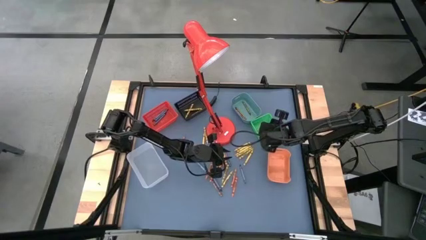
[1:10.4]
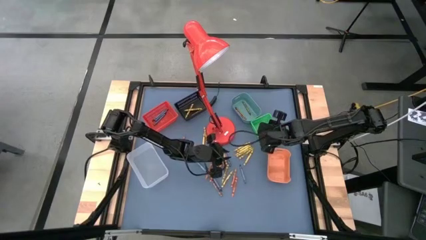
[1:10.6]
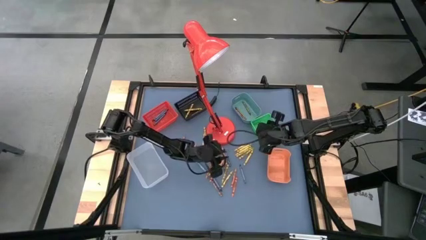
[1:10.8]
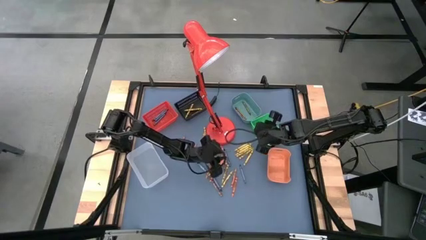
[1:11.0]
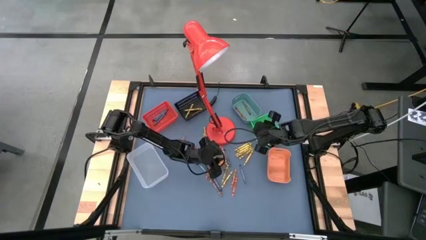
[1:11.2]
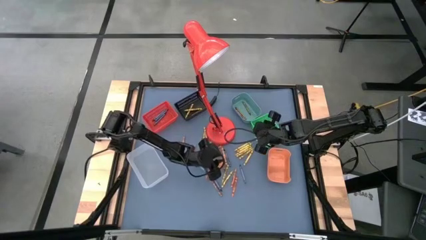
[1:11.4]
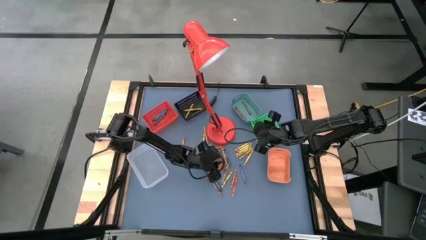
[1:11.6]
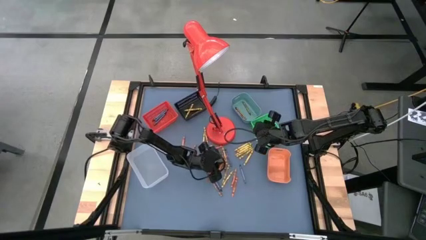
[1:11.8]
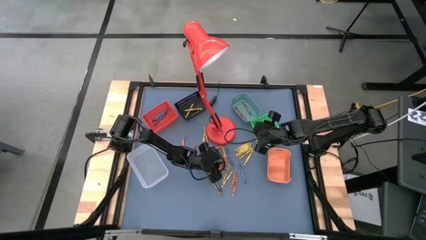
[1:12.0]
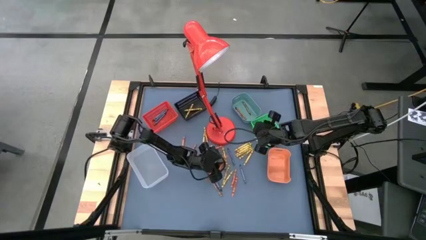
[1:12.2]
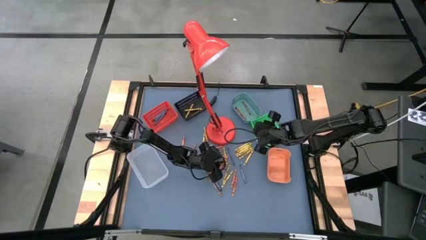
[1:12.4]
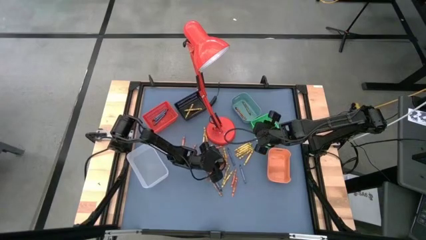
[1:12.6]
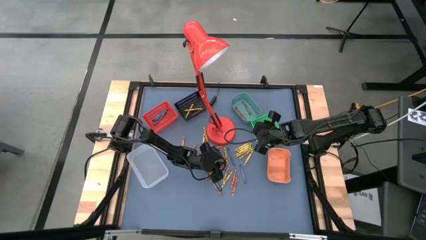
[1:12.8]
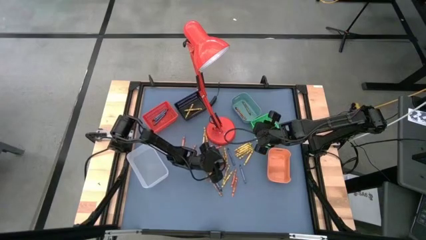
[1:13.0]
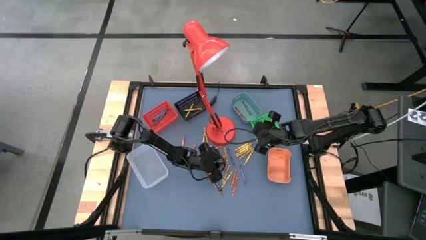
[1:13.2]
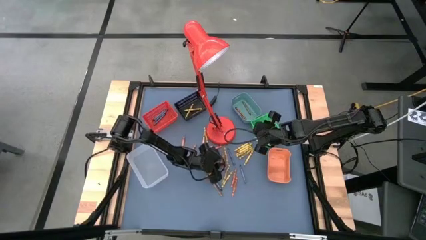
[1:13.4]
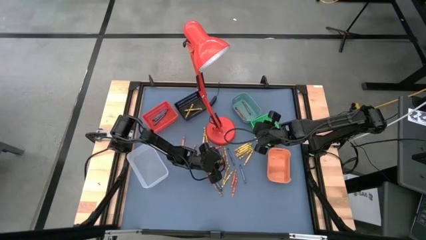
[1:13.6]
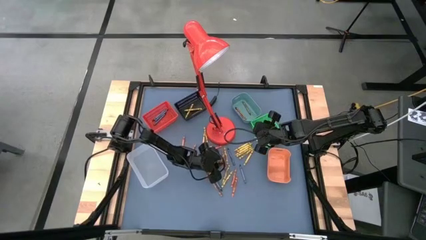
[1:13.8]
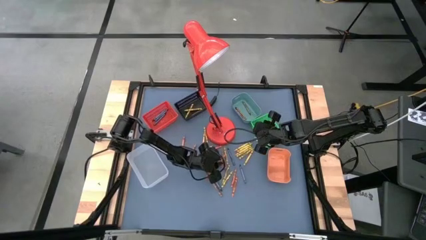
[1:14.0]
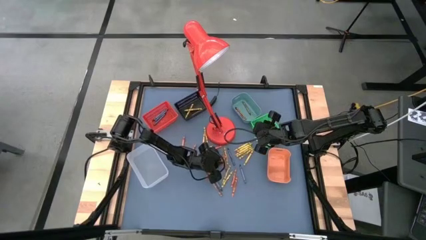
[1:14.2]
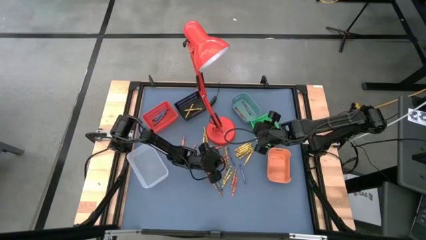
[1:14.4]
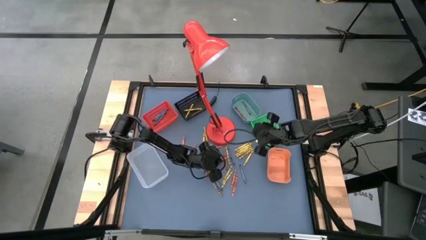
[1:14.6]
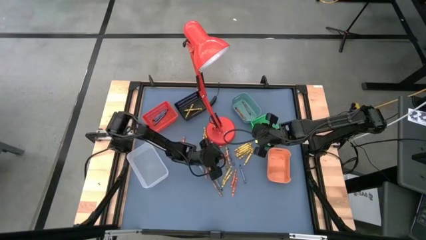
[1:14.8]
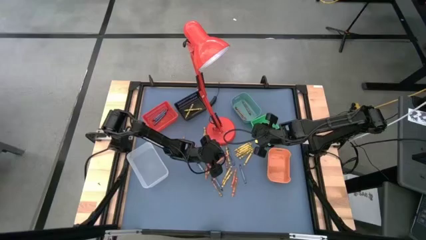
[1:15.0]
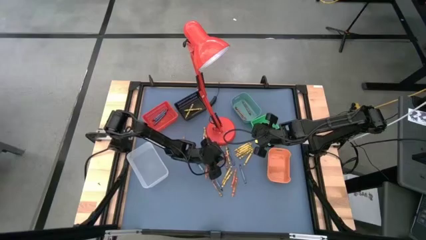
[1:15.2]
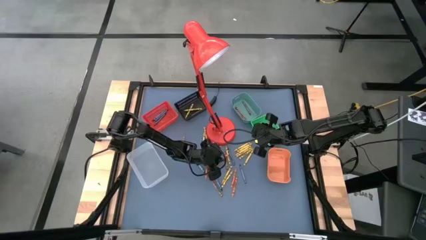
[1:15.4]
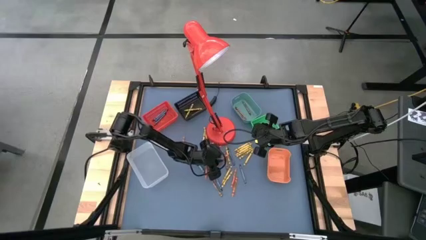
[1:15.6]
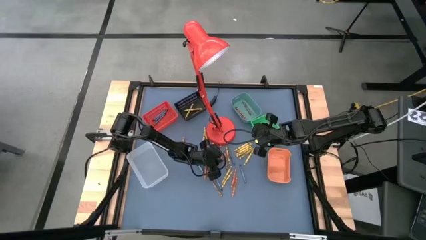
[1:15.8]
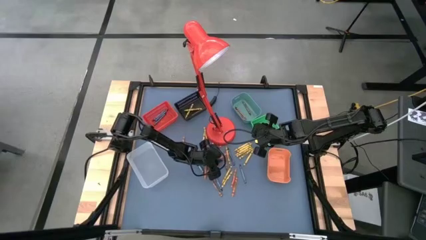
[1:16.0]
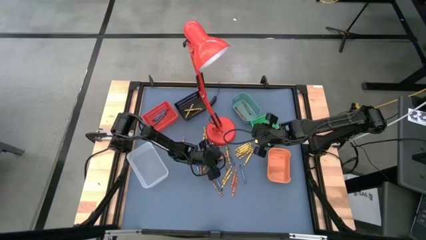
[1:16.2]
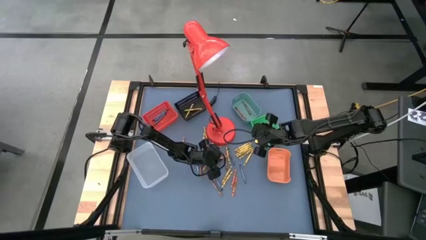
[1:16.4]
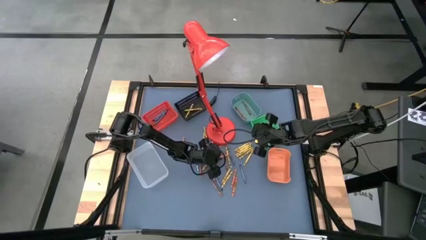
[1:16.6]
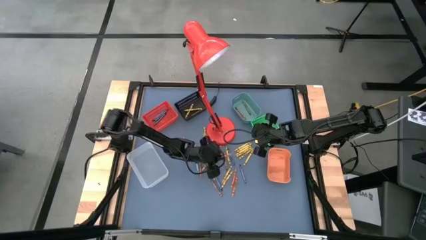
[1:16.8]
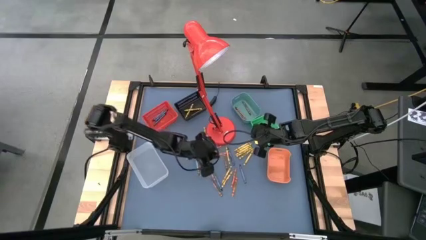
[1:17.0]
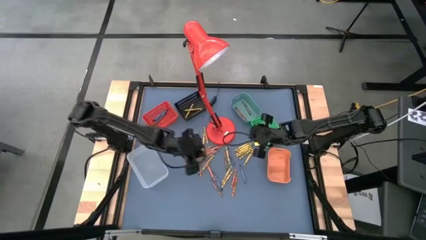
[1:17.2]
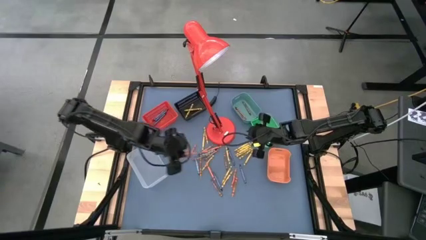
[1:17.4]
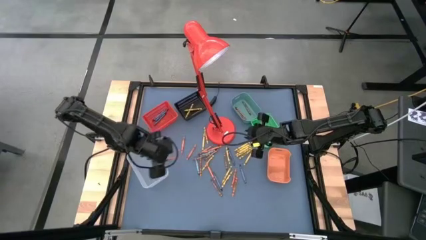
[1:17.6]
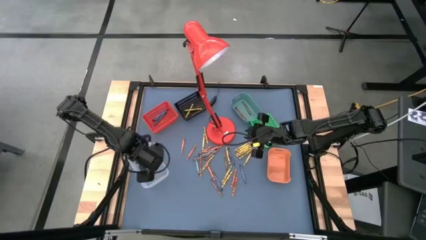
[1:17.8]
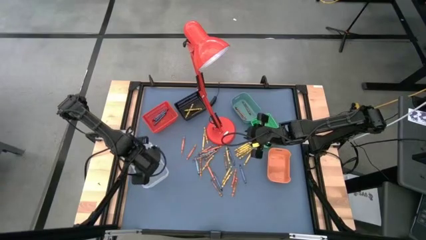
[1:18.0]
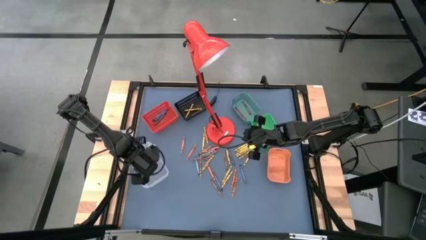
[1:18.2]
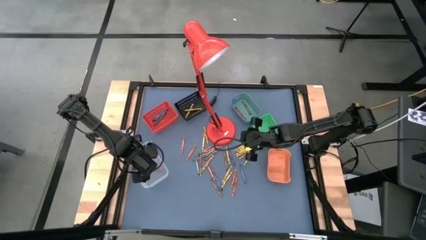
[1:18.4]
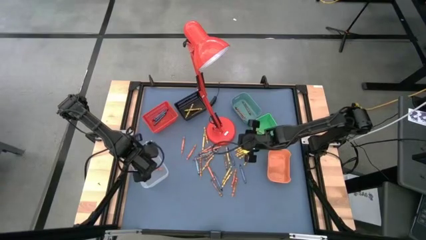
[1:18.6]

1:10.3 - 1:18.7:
Task: Sort crayons
Put the orange crayon into the bottom left transparent bin

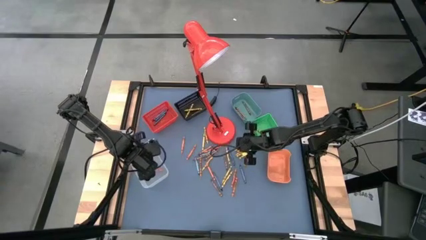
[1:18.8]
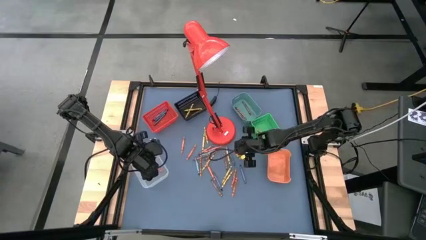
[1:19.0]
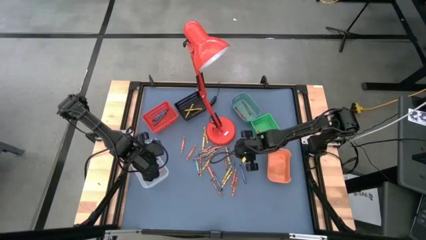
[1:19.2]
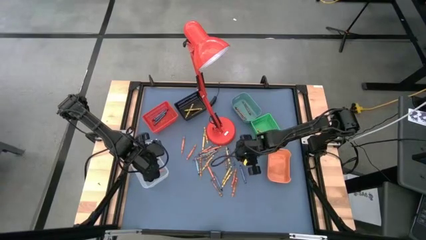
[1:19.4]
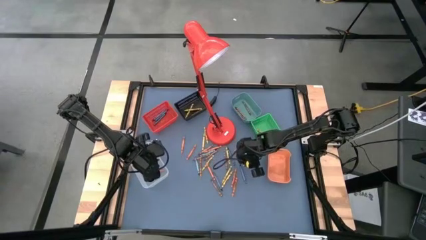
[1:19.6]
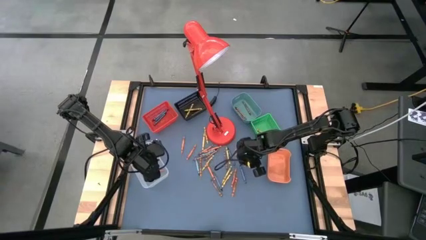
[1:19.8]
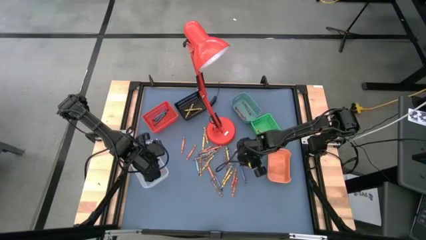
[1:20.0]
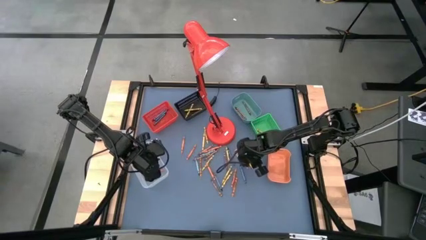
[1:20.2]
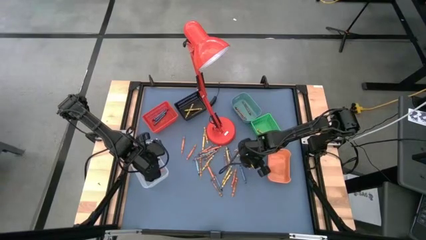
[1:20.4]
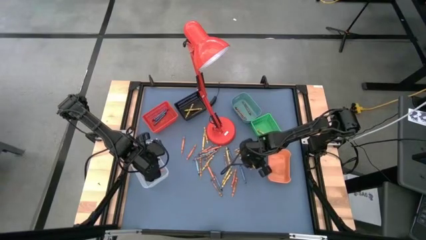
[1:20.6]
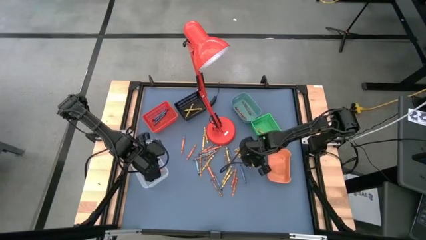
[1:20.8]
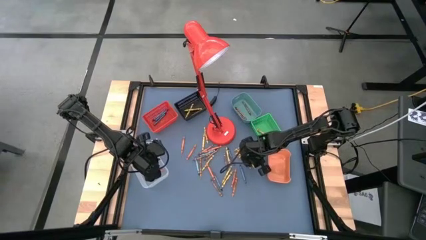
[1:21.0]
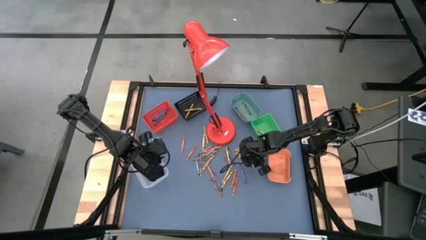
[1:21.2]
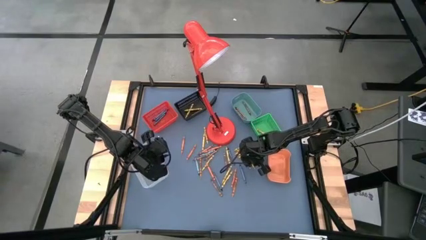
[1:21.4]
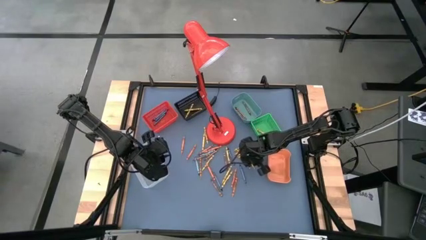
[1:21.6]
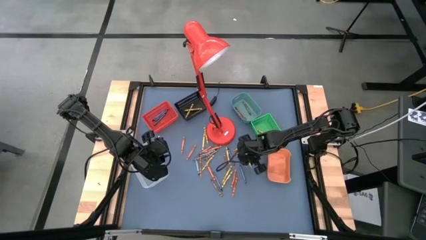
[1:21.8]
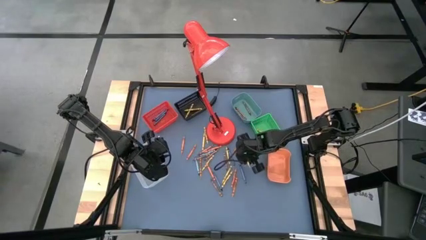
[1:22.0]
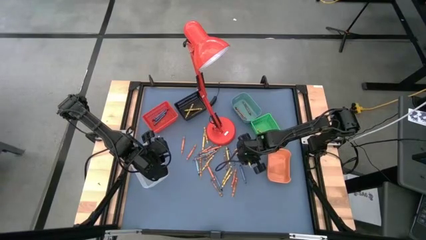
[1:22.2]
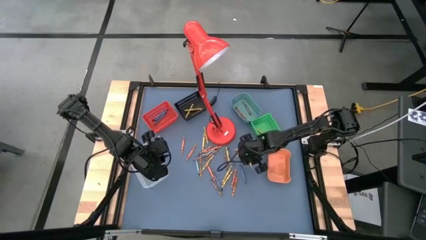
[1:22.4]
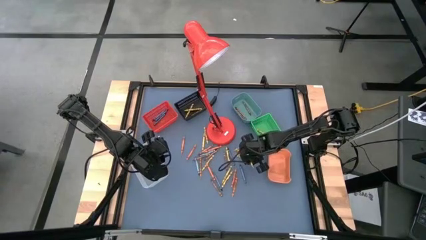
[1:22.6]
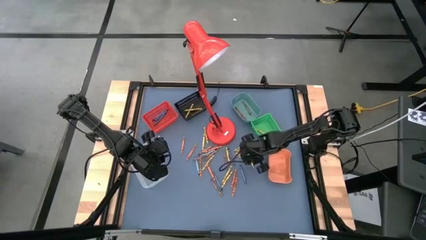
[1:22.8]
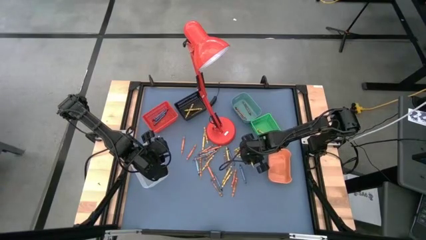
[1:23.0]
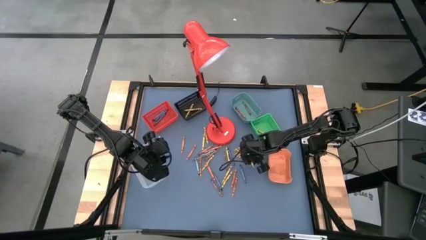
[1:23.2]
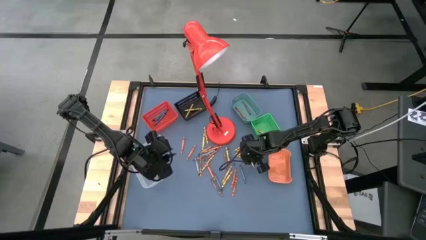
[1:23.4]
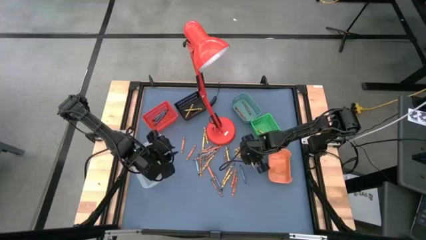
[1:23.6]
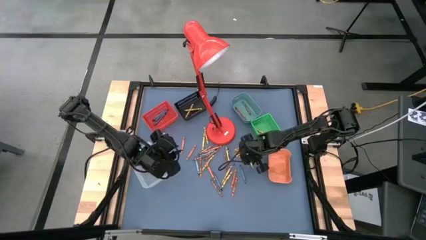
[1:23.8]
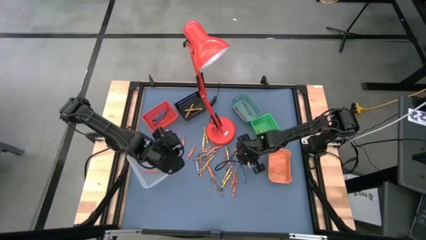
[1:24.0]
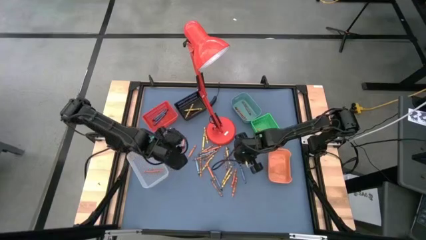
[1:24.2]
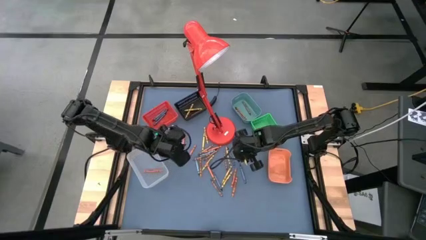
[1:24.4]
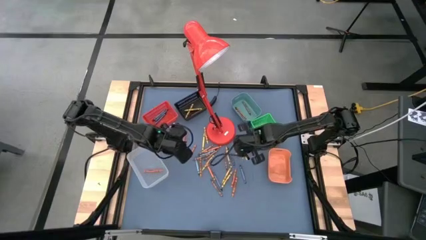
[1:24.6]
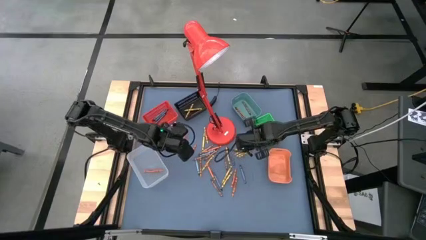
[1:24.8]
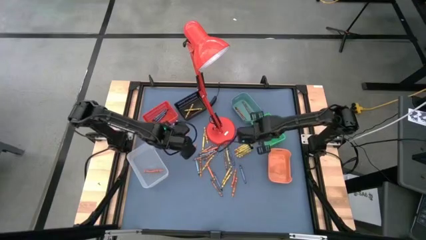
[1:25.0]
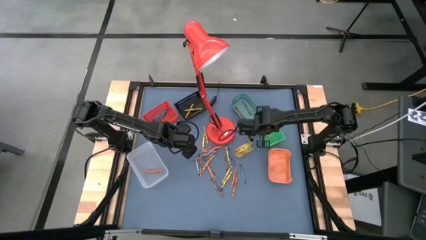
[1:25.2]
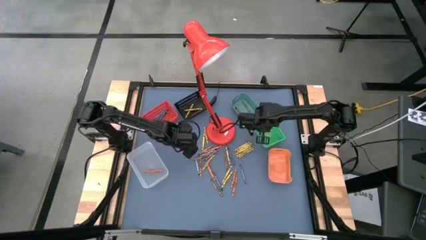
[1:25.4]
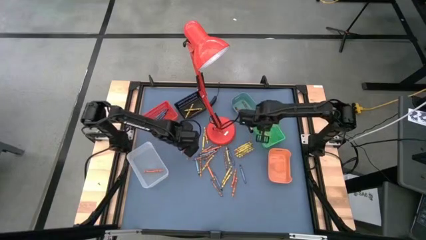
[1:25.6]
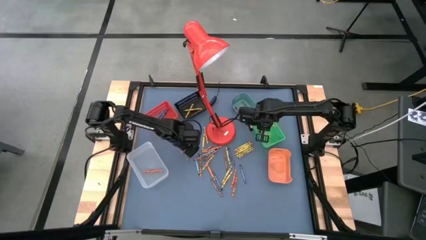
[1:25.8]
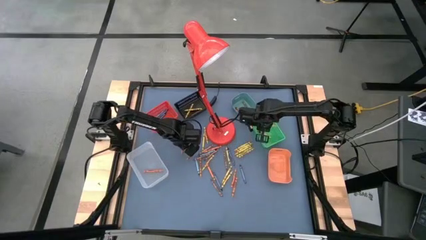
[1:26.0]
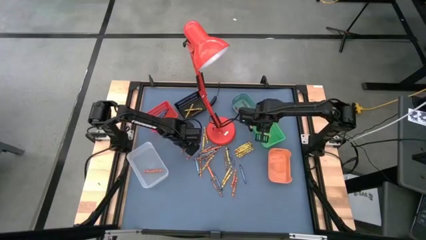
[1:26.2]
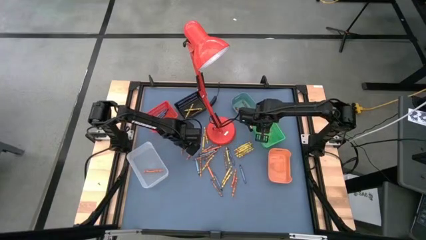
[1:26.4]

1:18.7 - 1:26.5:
Put the yellow crayon into the middle right green bin

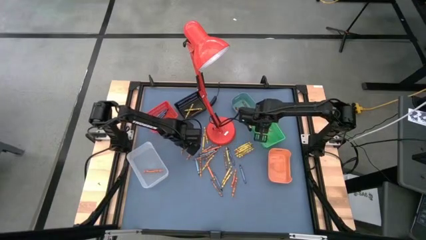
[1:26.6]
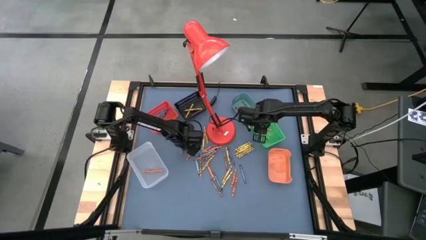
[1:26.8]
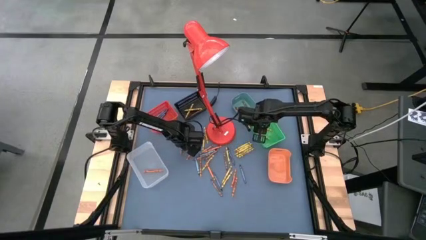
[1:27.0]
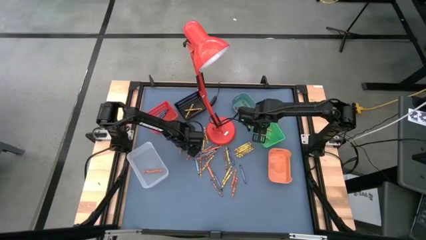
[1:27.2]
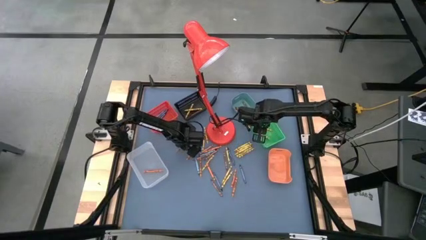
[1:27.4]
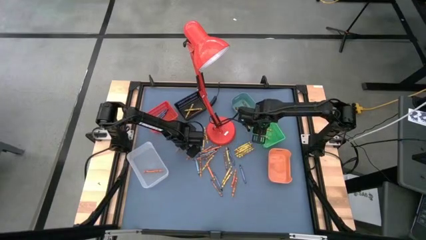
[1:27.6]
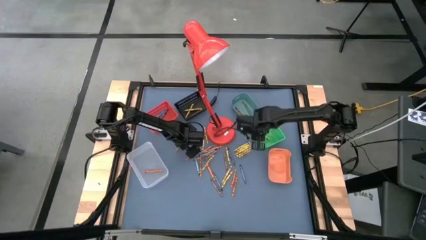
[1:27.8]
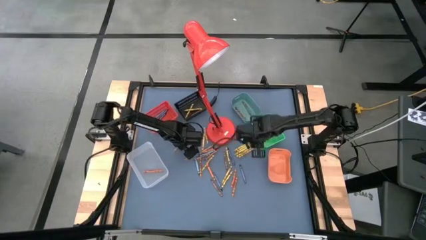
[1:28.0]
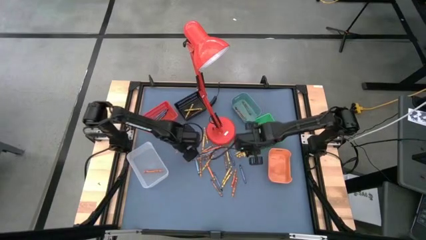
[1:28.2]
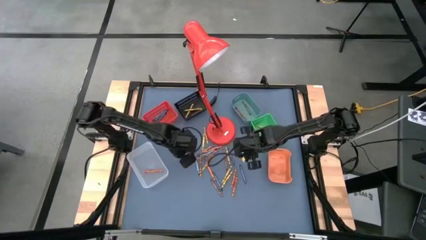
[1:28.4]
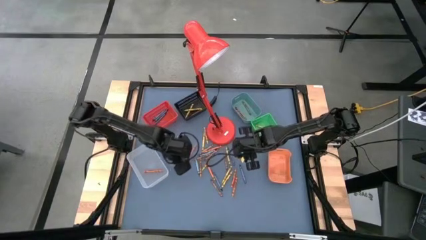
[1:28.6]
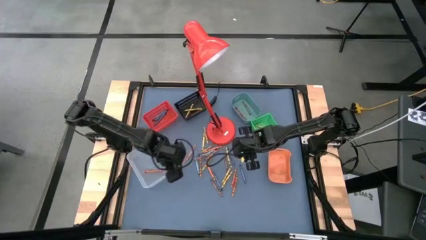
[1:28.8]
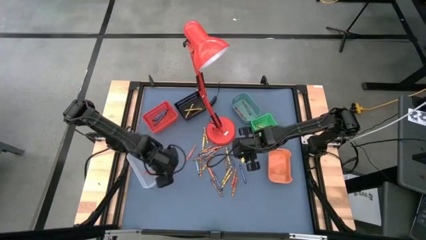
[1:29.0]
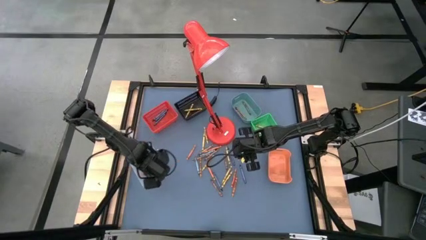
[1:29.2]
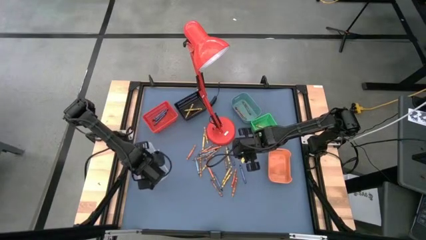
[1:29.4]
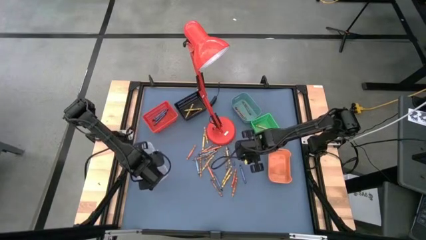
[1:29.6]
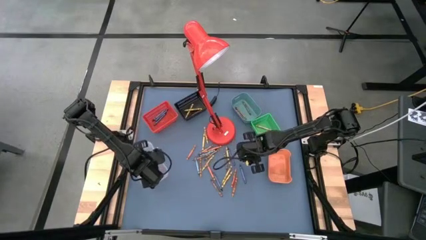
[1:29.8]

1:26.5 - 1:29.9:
Put the orange crayon into the bottom left transparent bin
